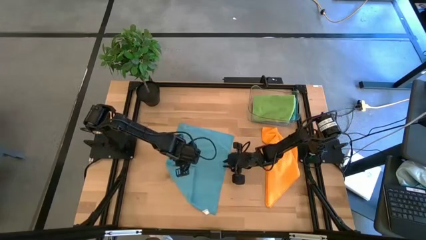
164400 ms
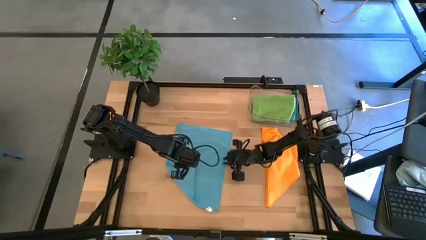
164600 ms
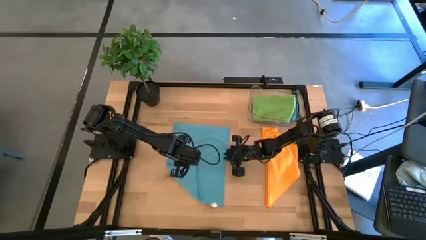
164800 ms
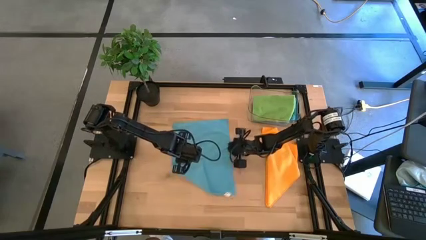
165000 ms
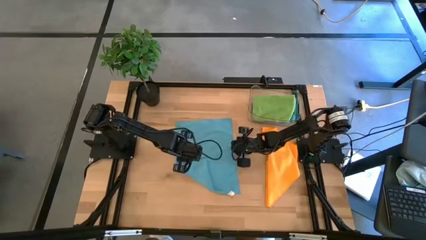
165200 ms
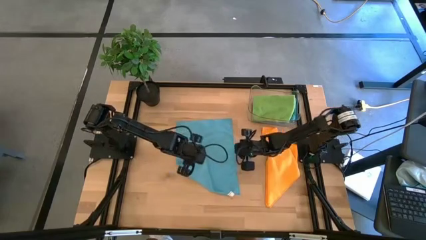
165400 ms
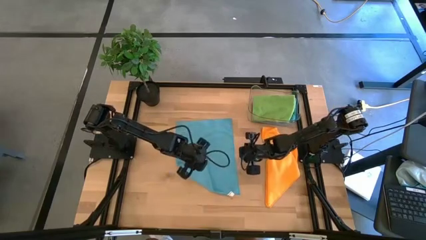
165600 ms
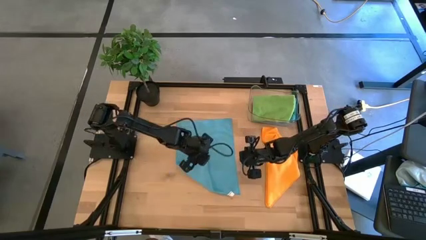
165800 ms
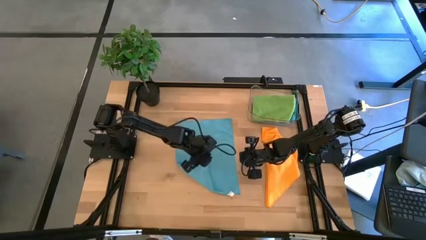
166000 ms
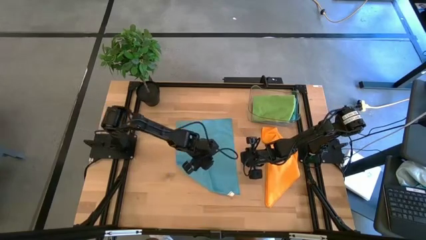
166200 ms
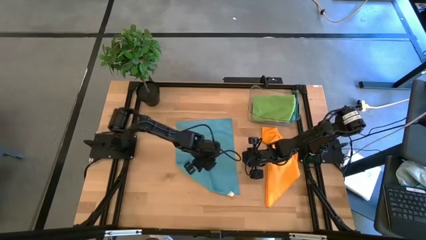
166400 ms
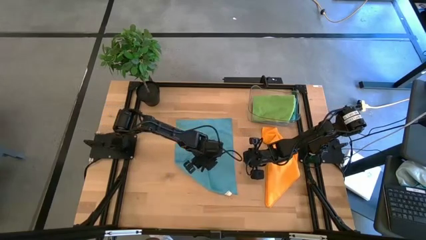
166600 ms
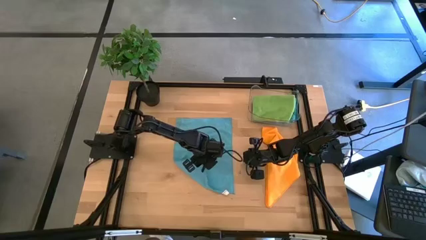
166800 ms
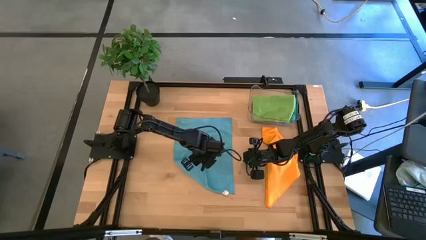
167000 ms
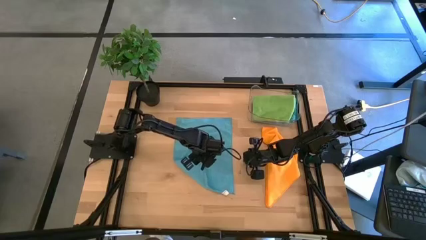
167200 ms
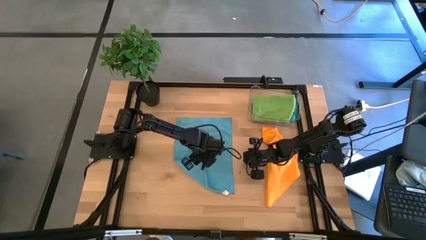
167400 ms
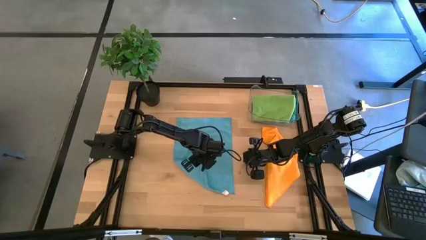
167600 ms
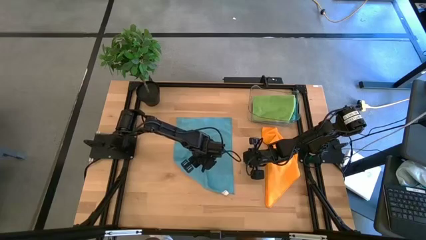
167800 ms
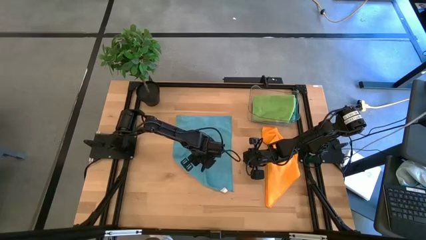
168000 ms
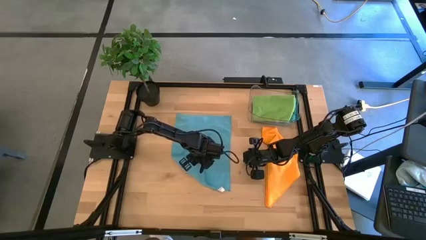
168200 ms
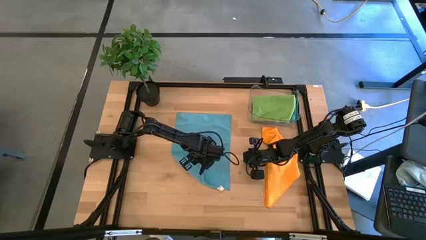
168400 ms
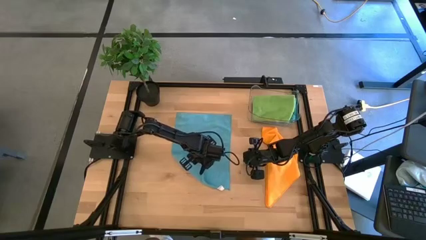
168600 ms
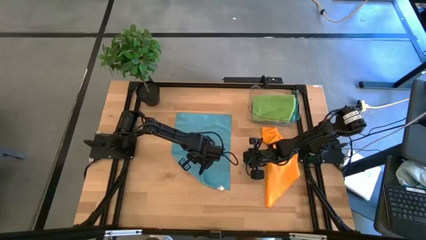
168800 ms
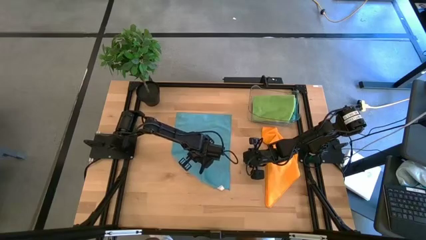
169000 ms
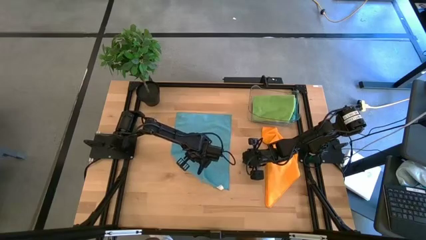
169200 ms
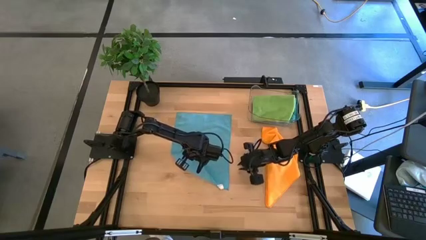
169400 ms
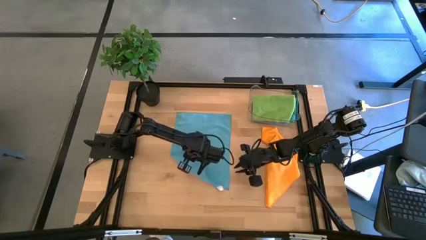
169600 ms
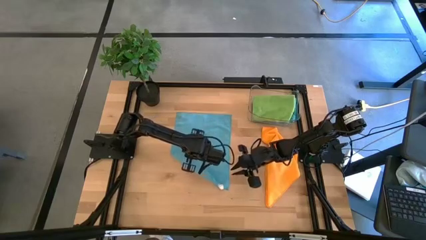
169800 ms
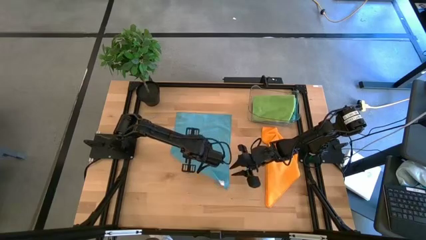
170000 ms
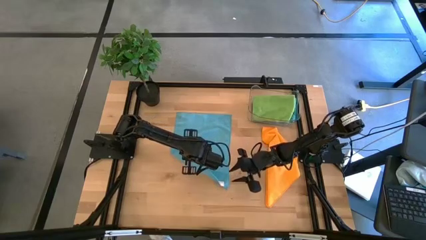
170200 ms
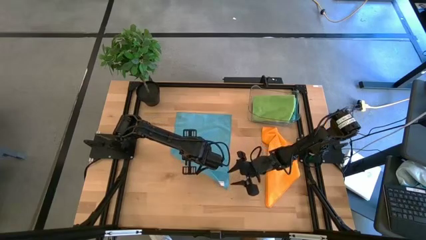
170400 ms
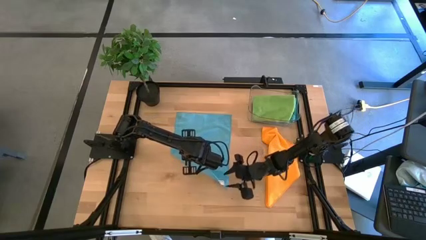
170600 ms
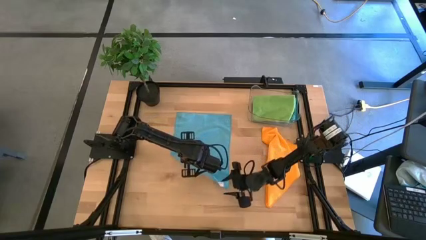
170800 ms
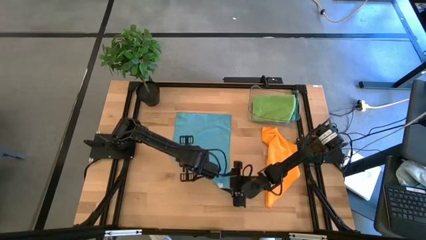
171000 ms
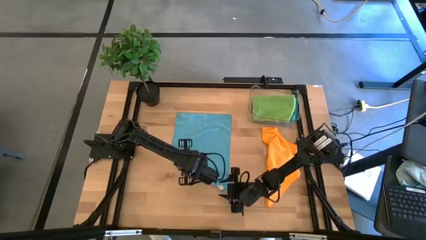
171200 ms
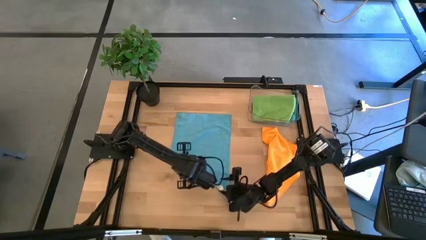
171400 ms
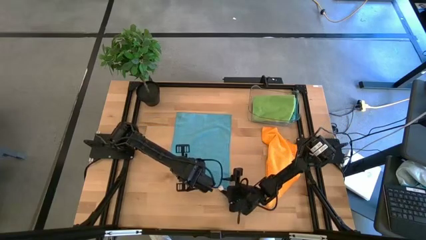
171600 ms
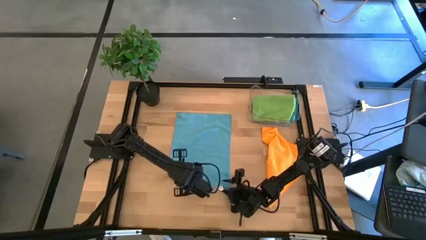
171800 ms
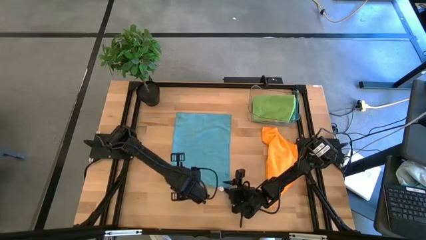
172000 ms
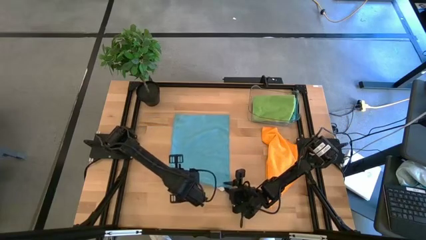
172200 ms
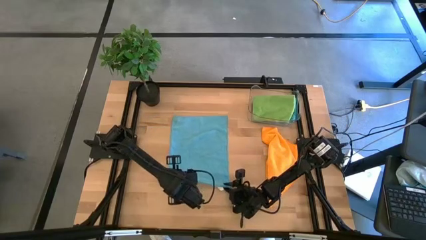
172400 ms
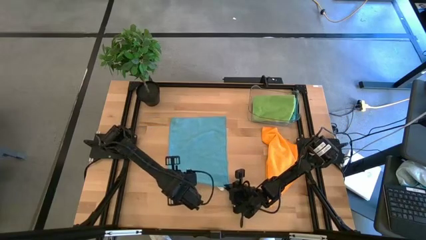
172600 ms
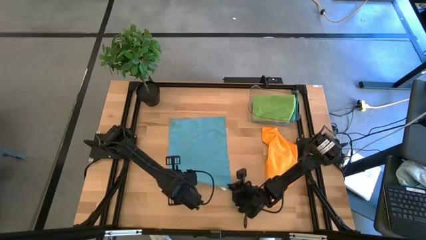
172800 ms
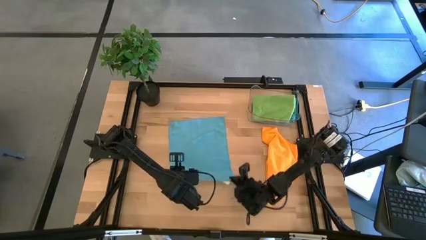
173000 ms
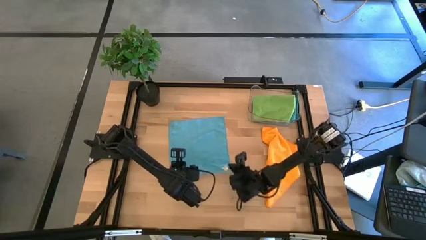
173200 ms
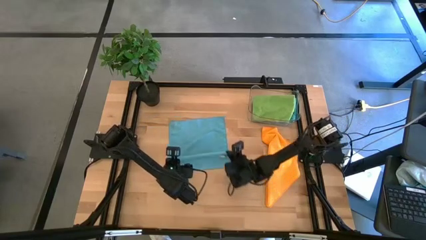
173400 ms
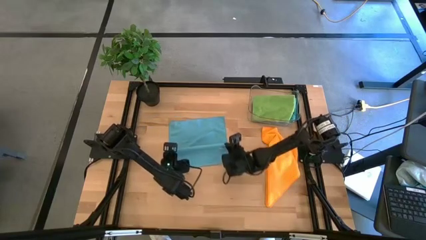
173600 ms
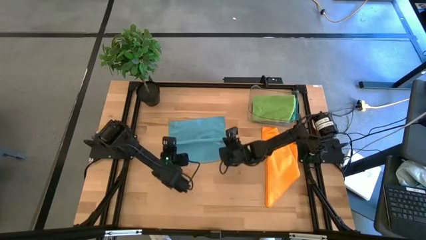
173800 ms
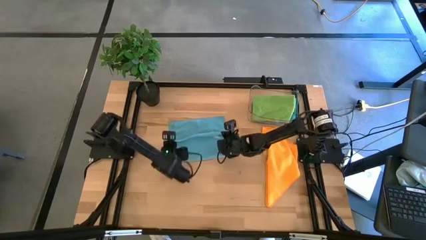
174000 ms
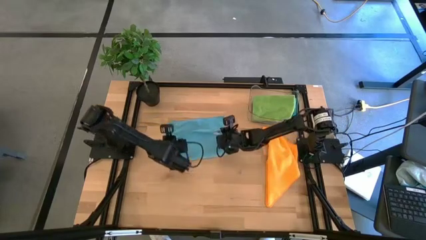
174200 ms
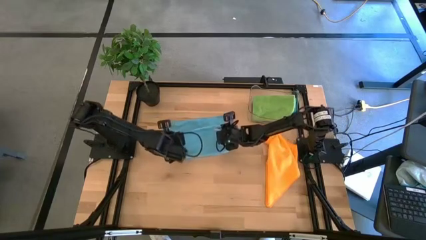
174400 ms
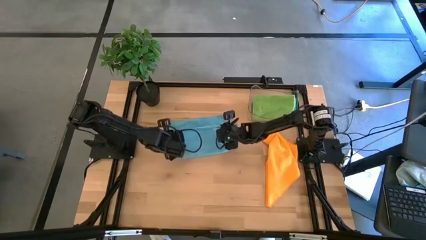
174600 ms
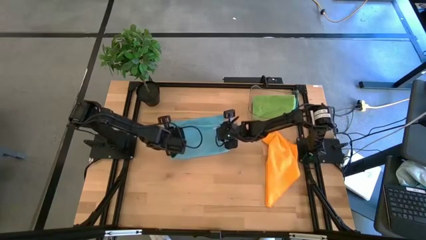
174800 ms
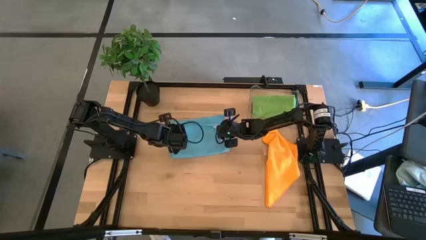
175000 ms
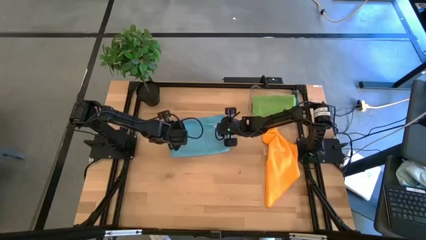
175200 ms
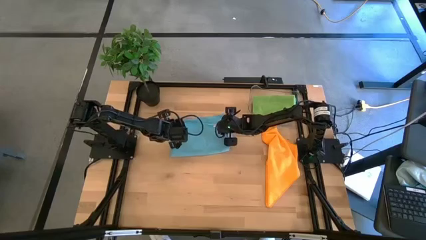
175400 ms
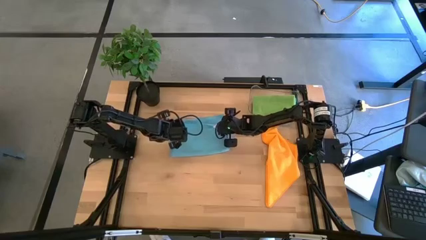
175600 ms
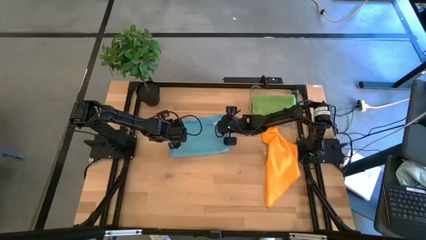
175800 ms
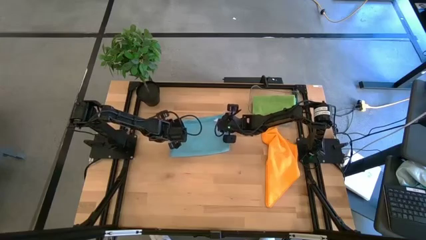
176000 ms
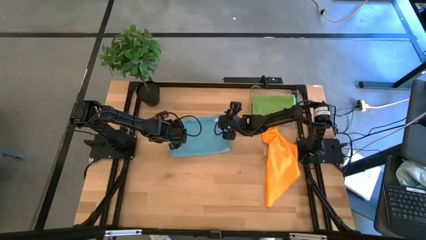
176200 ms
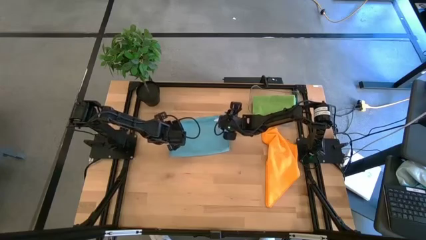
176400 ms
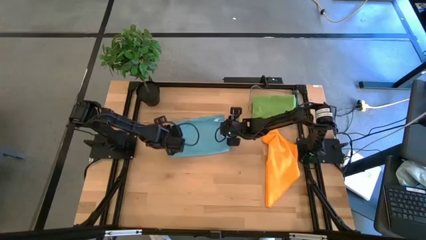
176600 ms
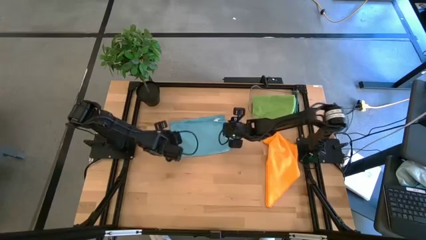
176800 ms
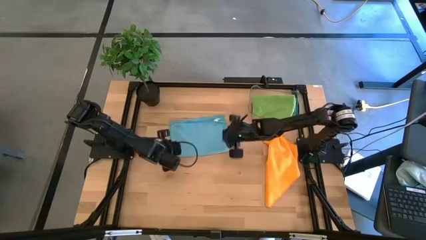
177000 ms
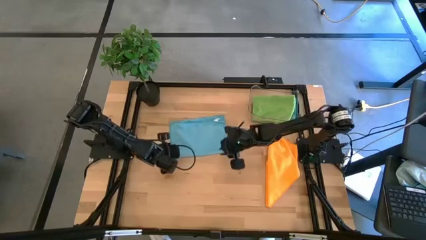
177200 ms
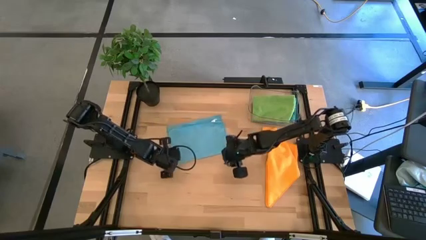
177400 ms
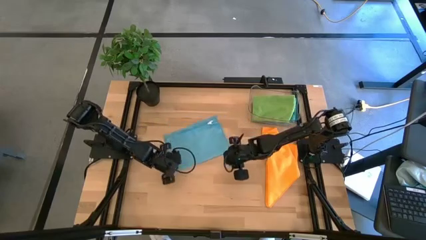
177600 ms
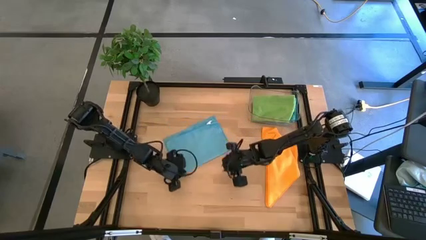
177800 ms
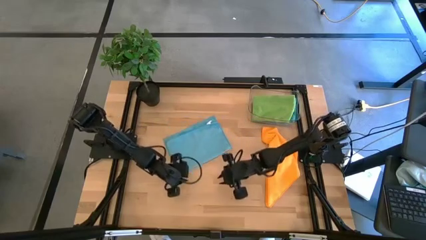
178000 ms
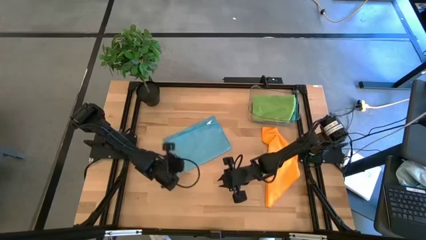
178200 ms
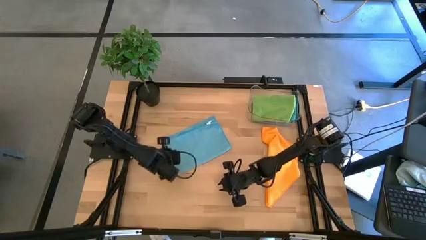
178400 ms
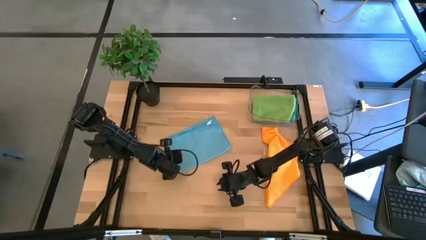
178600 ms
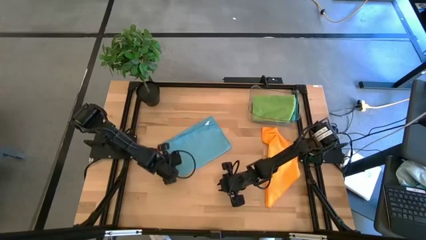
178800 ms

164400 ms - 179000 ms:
Task: Fold microfiber towels
Fold the light blue microfiber towel

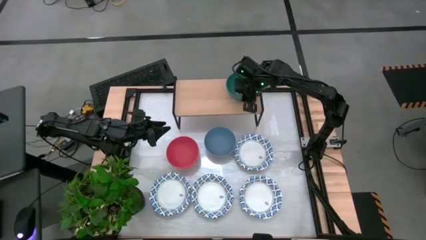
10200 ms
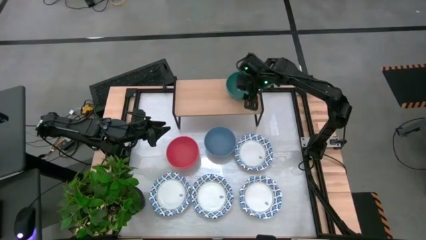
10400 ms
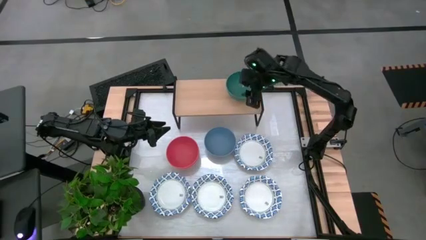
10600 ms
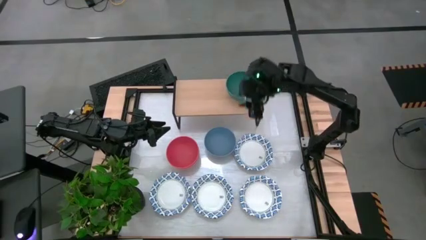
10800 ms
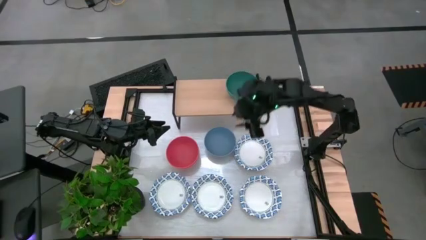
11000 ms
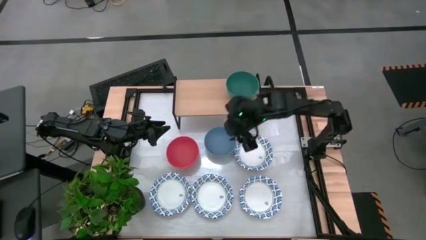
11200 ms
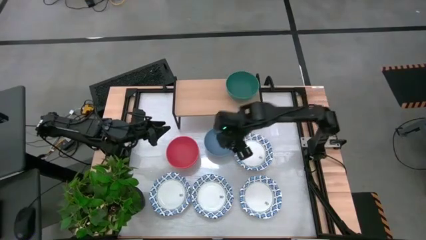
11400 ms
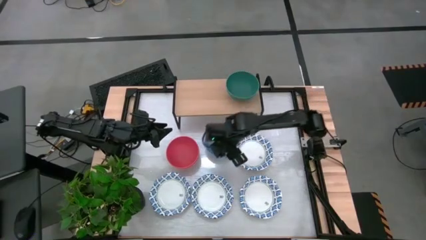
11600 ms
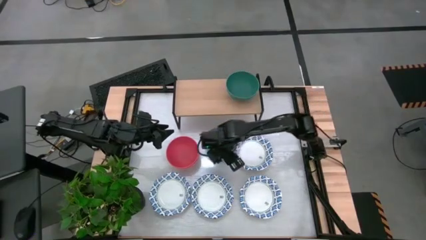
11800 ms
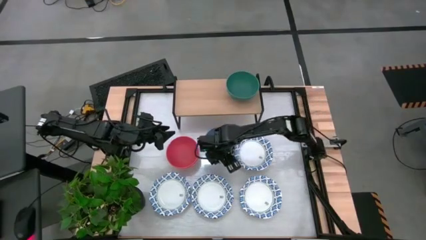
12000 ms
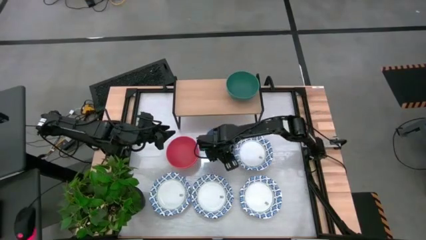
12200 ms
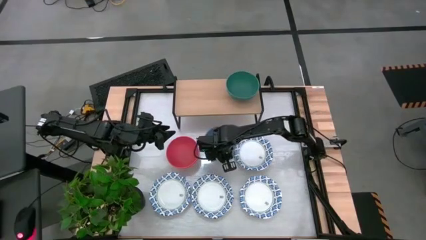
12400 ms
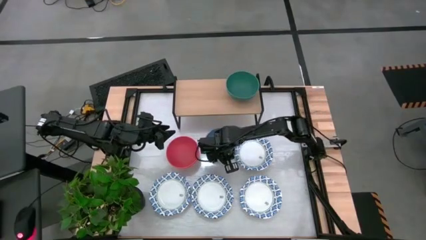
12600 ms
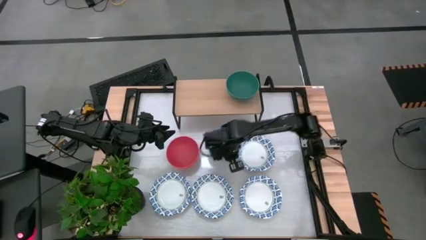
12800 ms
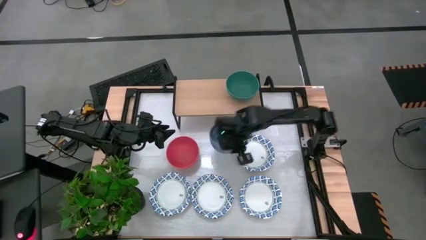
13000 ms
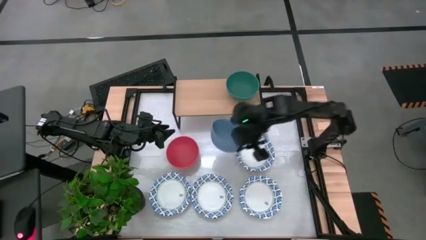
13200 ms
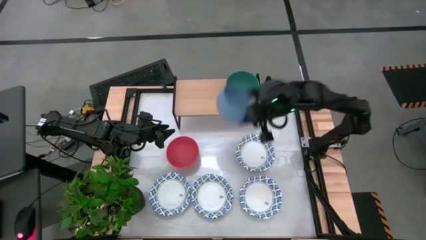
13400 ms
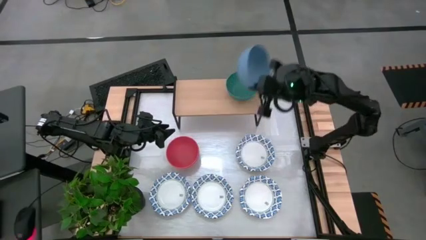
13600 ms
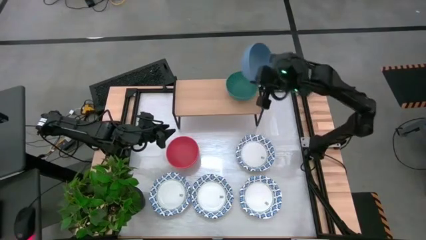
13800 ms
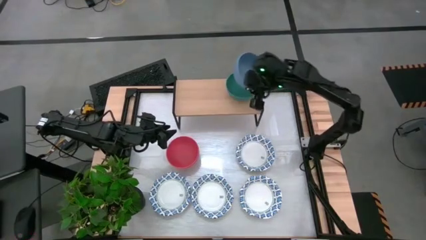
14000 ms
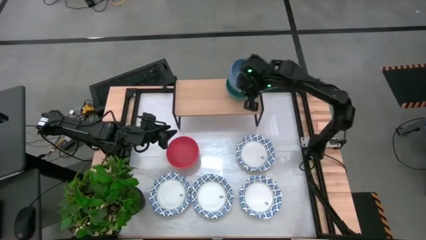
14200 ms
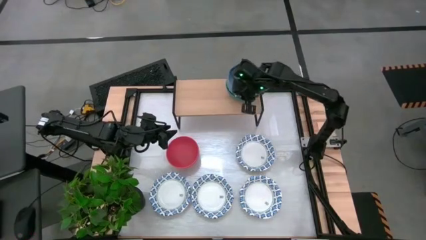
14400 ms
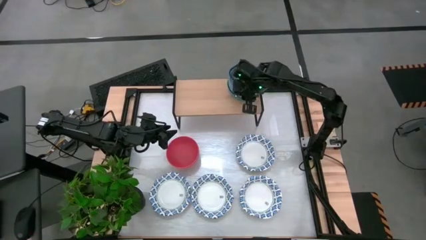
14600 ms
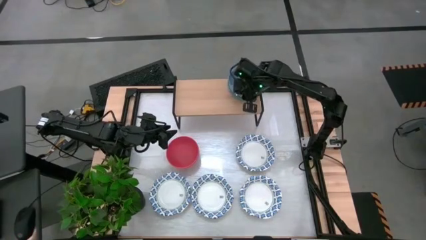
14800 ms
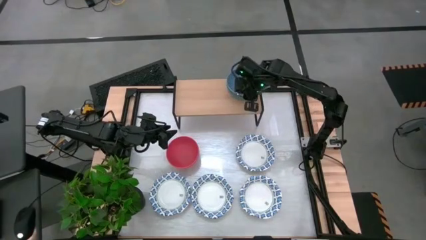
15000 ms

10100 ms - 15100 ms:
Task: Place and stack bowls onto a shelf
Stack the blue bowl on top of the green bowl on the shelf
